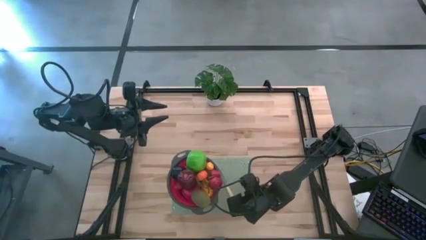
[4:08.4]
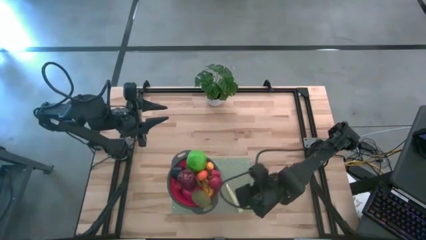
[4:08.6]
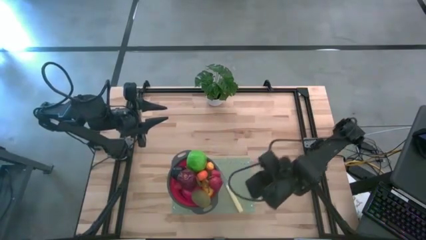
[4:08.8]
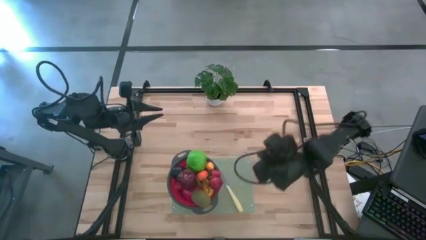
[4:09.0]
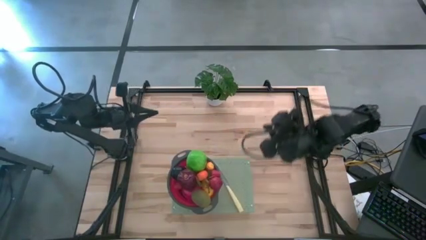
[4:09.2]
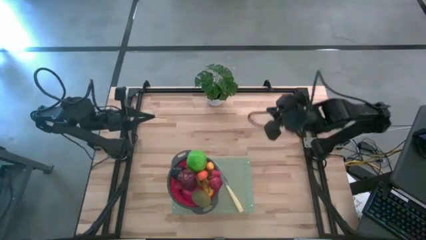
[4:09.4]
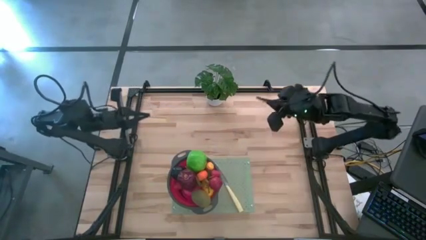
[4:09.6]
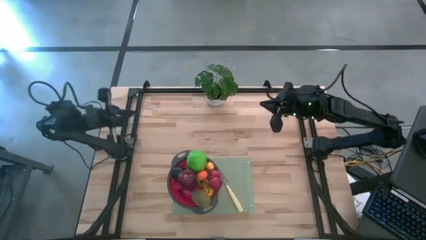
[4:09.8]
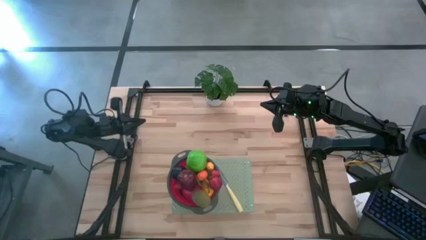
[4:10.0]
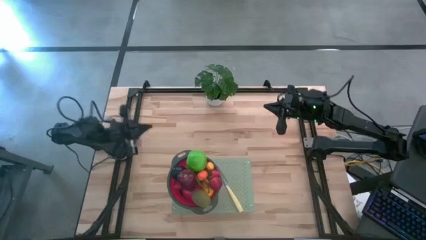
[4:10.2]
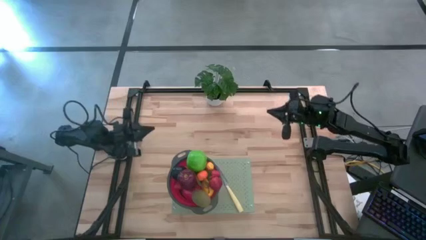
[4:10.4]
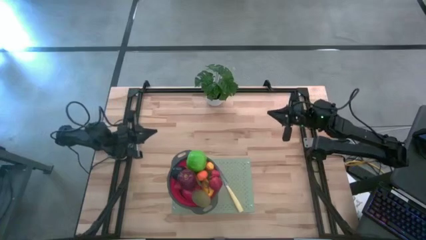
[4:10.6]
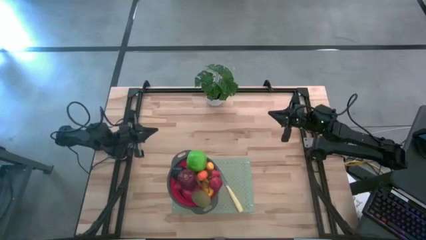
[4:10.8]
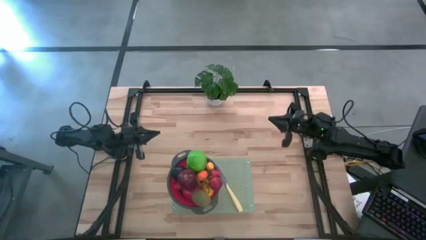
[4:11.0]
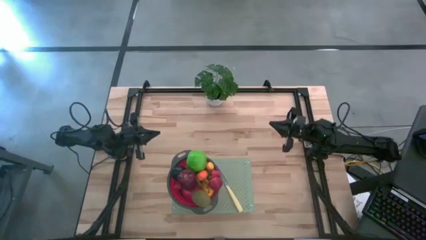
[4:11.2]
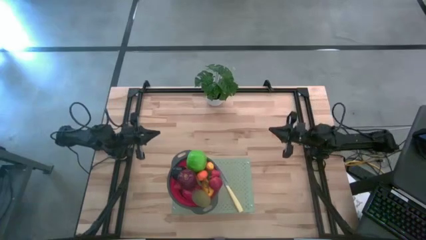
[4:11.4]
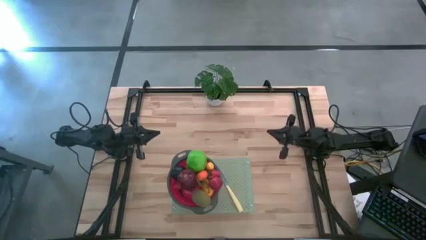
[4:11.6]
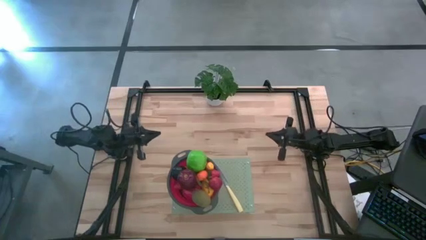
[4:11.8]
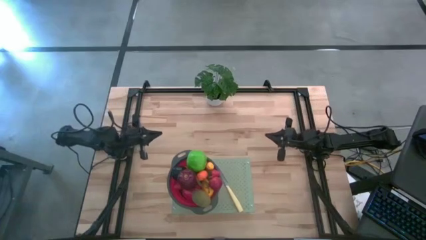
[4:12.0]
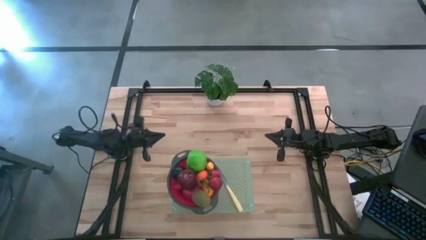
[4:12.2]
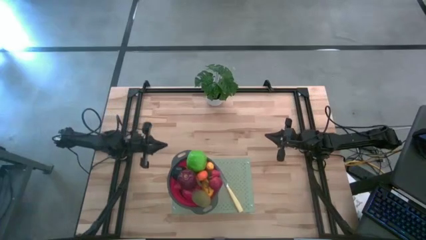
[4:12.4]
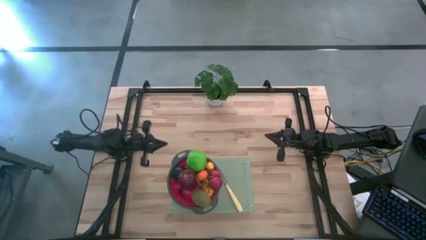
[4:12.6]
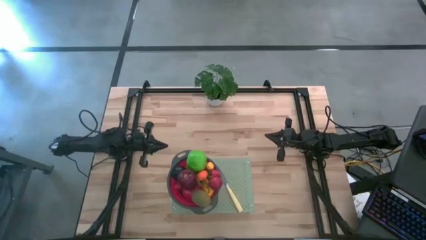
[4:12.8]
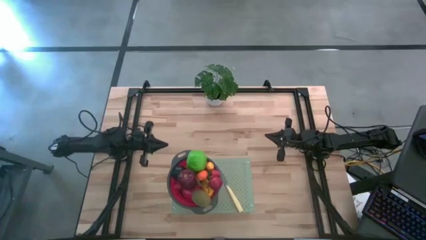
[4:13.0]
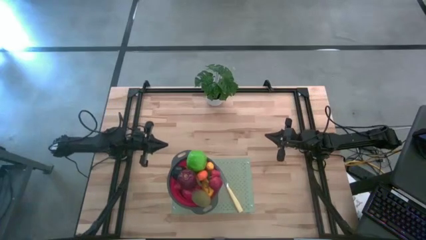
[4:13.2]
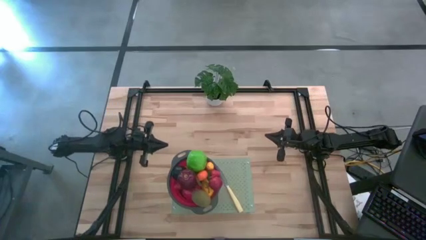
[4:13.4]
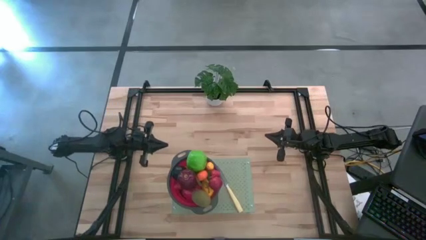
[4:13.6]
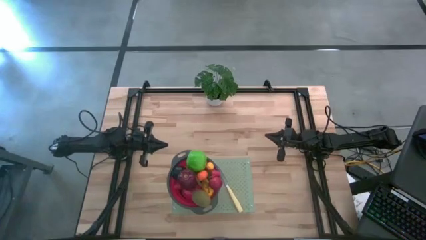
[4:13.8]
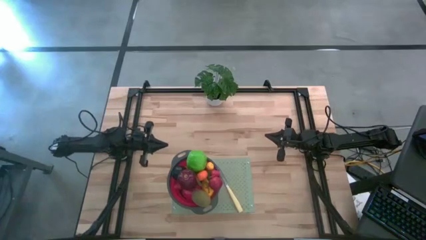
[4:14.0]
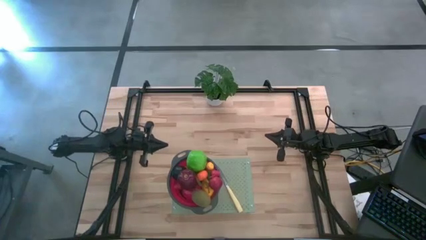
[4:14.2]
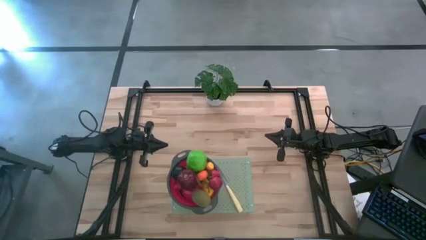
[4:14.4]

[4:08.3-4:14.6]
Task: Pick & Place Fruit
Return to Home Position

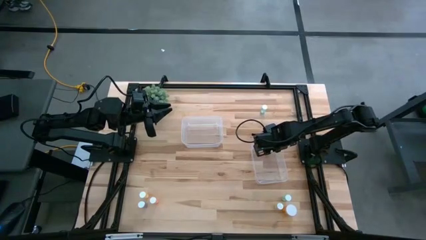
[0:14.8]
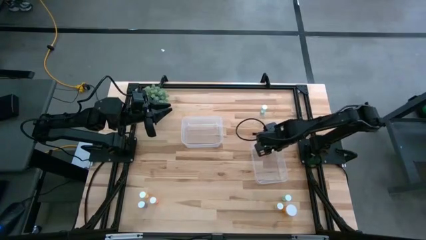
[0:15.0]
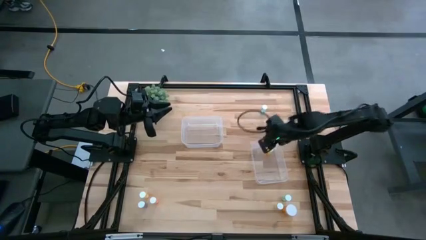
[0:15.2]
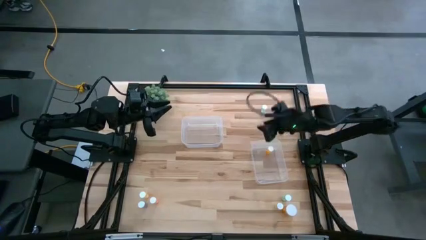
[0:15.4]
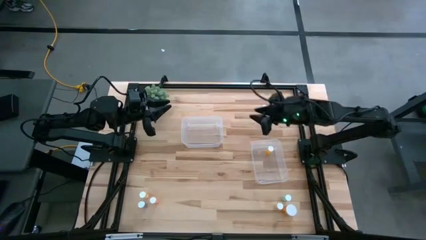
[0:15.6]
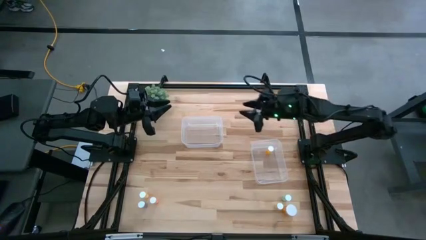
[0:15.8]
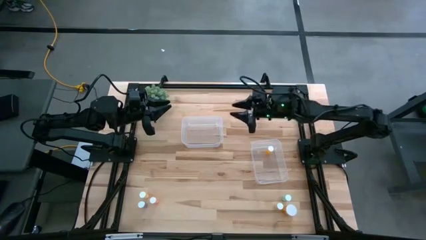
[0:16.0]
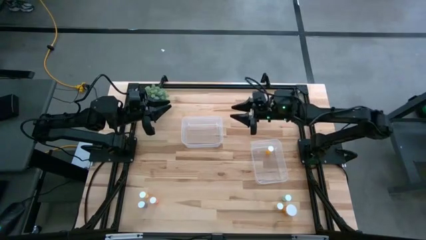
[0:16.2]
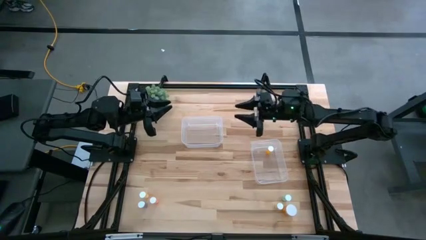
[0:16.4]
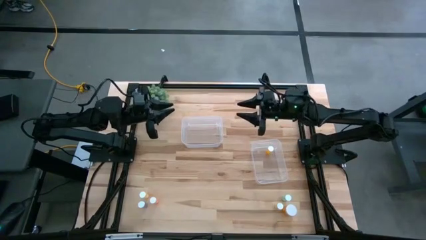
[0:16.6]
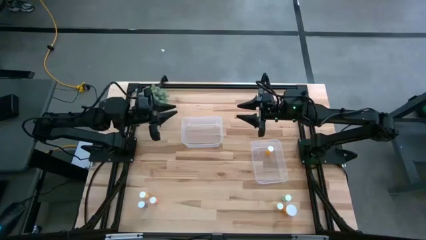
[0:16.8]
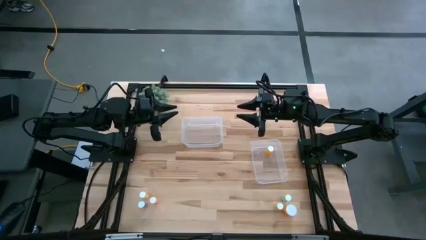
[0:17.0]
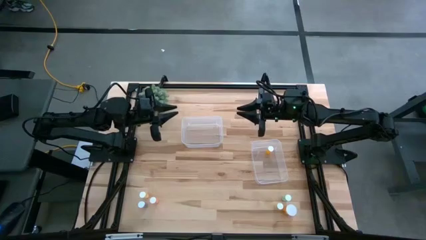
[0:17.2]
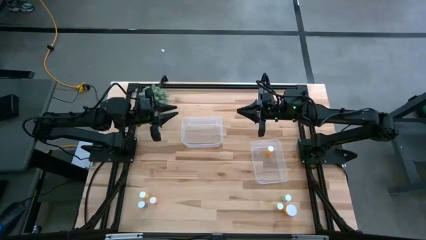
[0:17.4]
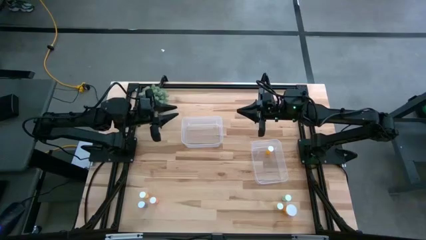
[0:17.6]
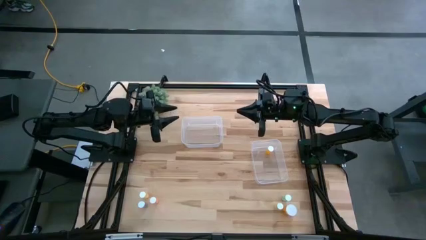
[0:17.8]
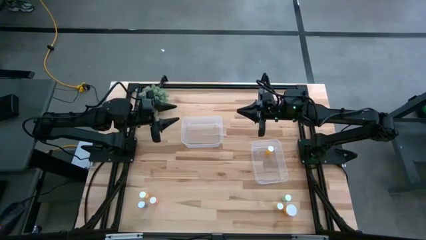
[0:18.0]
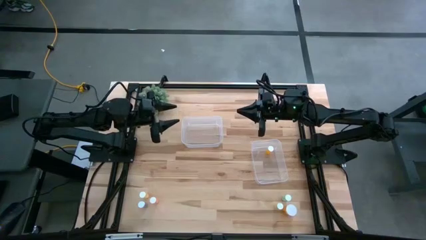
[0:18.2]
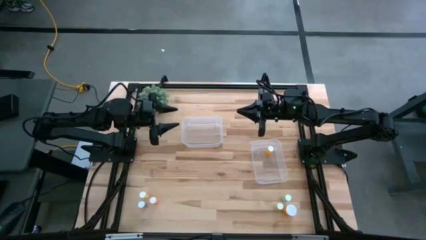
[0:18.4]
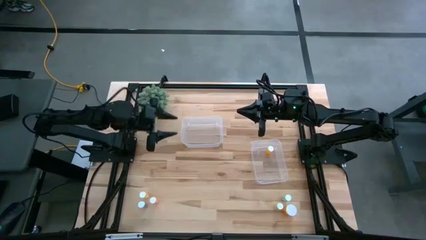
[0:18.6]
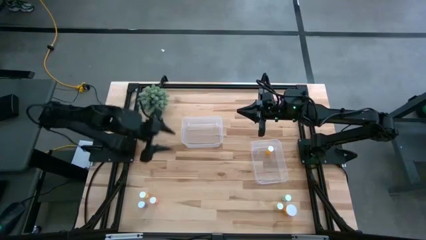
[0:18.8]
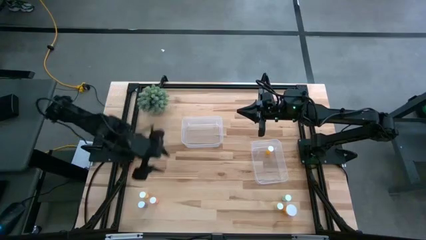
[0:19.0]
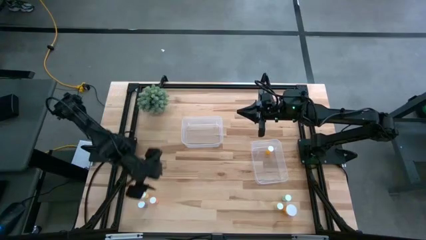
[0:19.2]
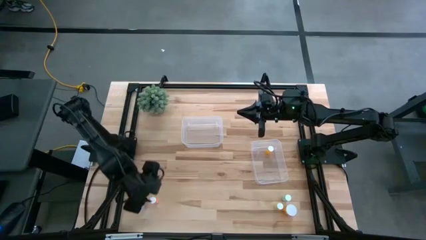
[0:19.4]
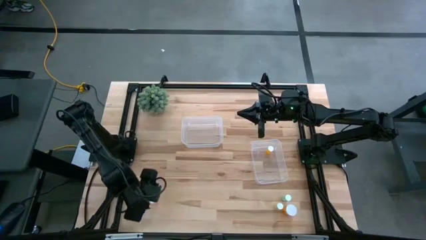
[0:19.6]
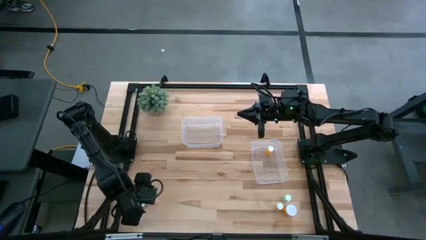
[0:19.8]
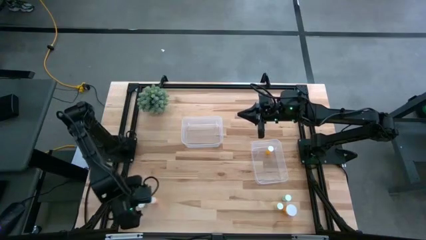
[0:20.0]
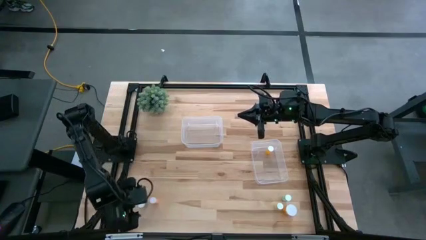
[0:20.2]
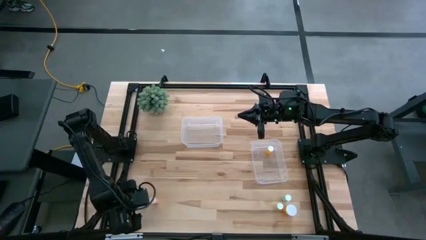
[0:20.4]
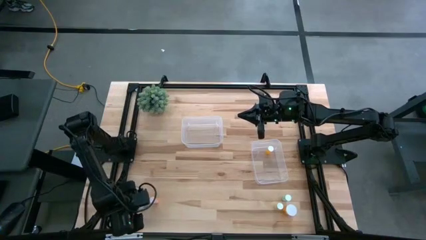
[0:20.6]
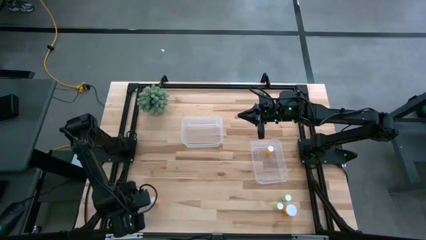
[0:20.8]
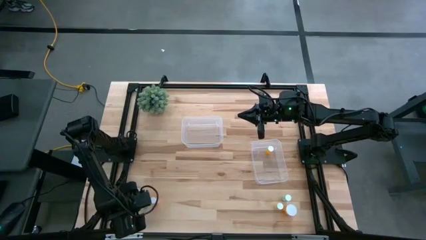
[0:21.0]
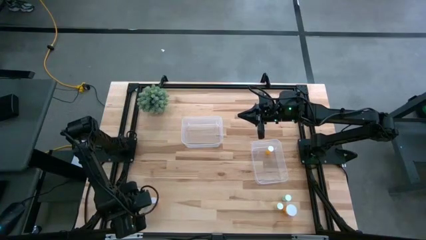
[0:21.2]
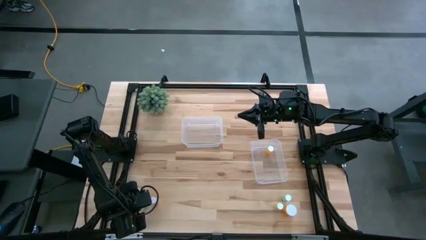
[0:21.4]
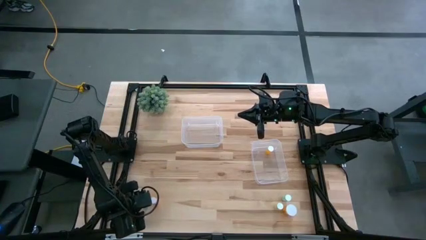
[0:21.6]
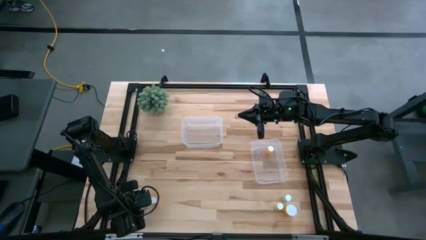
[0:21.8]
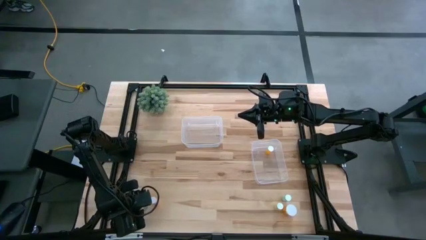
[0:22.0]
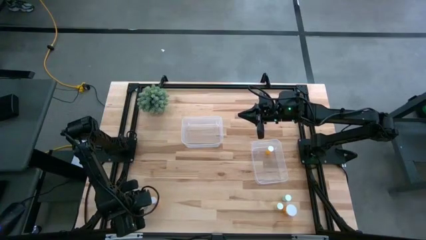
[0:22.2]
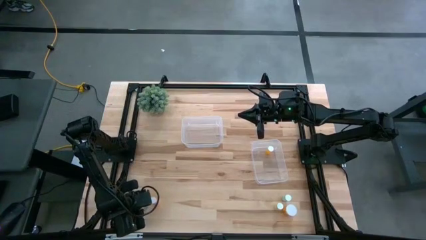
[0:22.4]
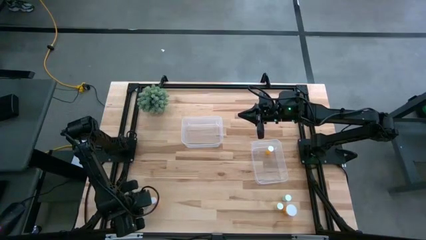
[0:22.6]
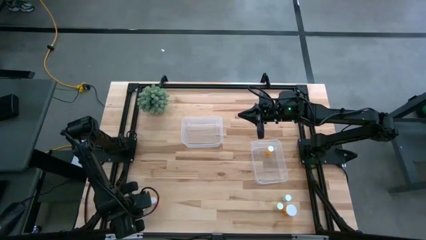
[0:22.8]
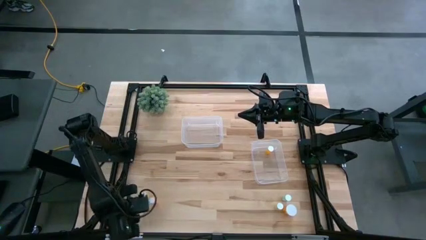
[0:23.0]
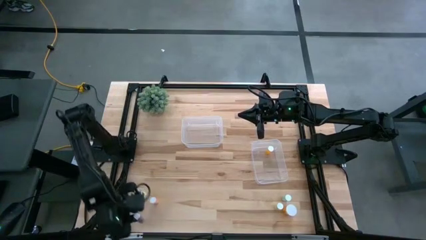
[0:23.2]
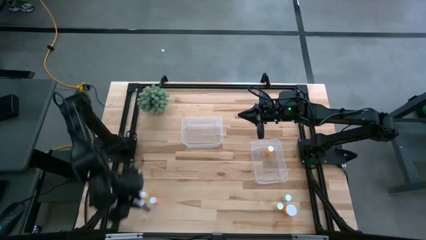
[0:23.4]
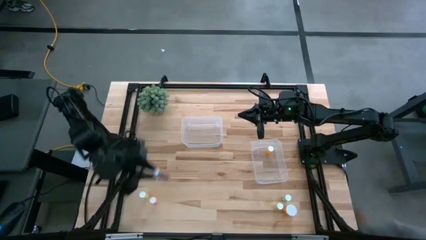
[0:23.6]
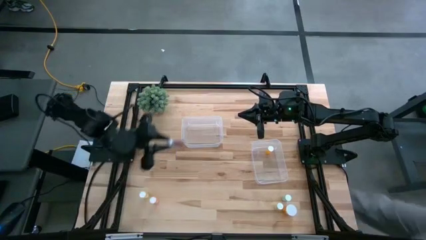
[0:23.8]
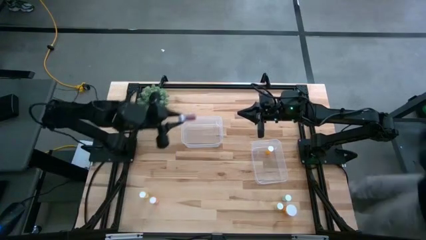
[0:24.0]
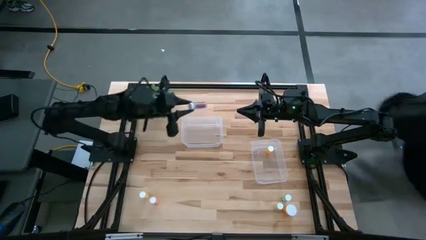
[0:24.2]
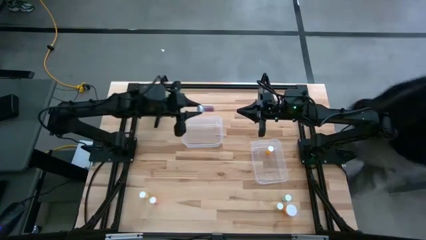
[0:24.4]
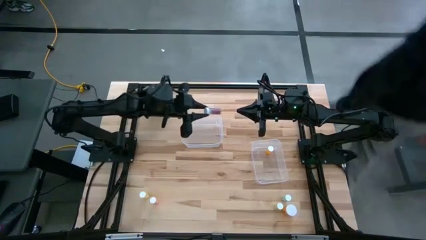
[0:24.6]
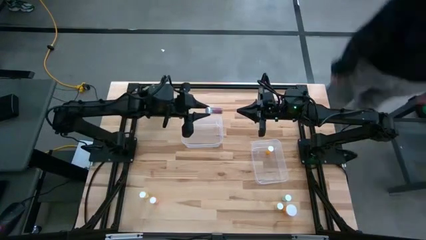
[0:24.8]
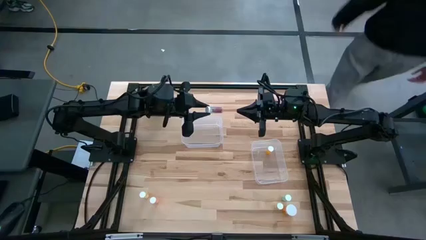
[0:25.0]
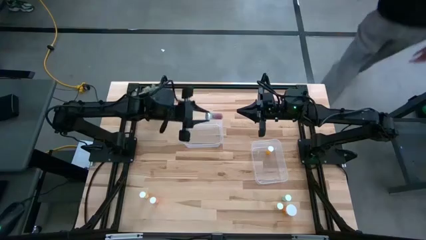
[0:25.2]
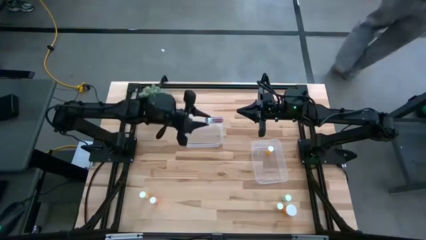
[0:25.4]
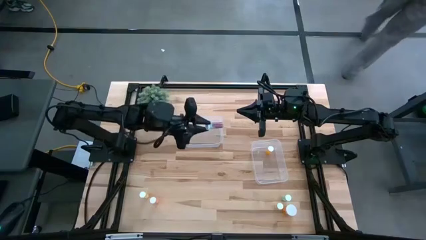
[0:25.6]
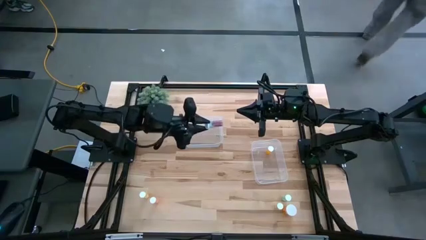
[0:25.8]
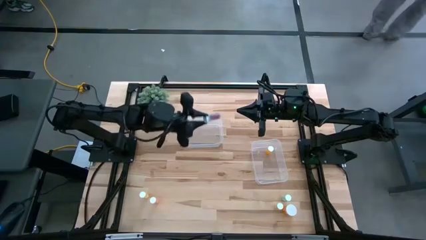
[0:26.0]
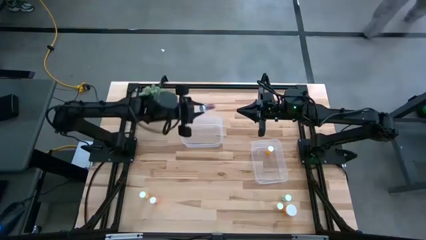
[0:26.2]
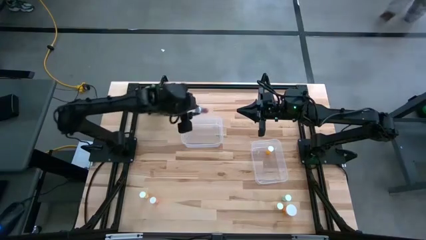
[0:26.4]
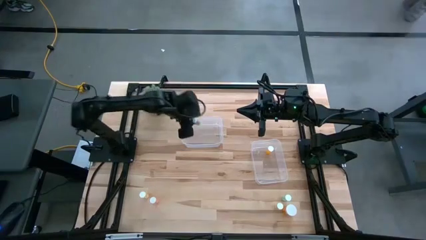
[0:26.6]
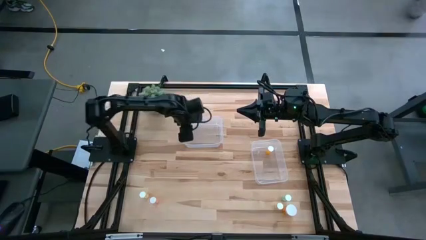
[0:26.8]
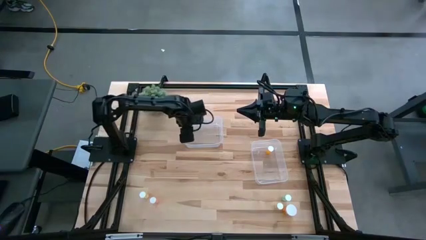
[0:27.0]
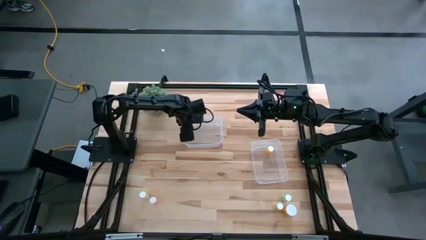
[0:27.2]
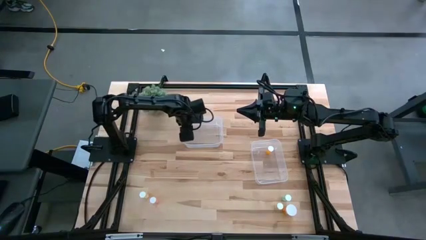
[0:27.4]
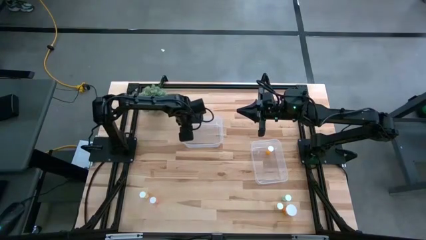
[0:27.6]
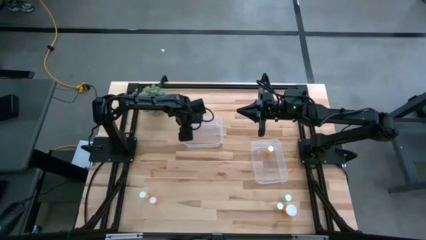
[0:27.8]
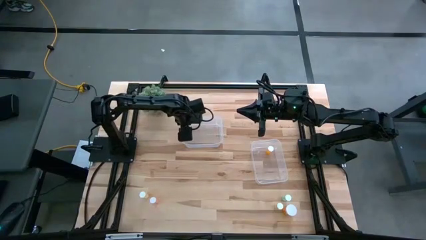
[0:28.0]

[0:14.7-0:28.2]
Task: Pick and place medicine bottles into bin by pill shape (circle, oval)
Put the left blue capsule bottle into the top transparent bin
